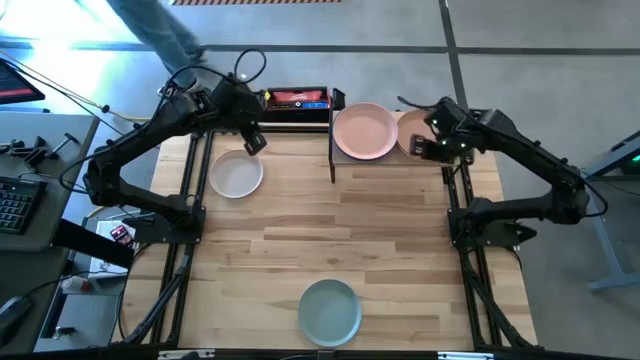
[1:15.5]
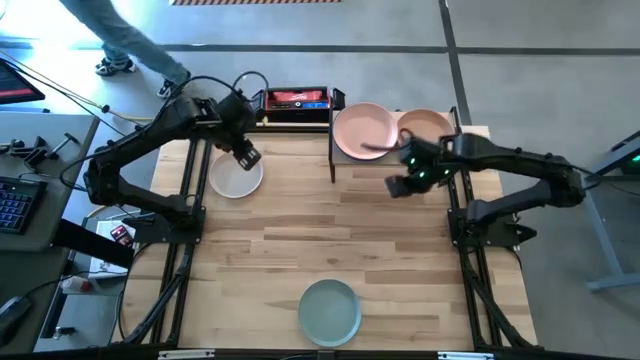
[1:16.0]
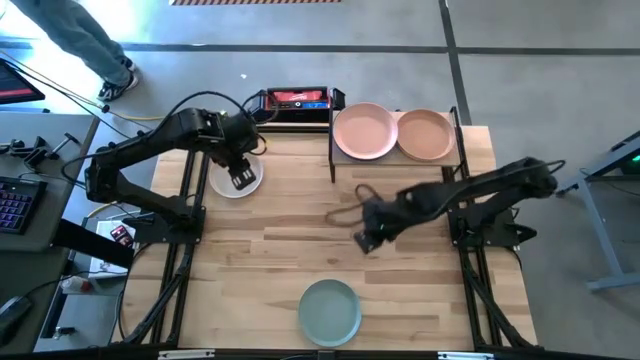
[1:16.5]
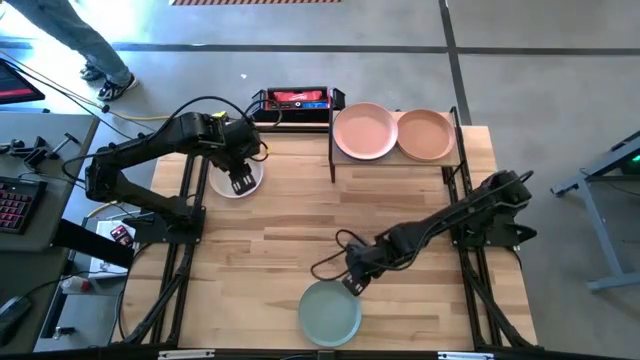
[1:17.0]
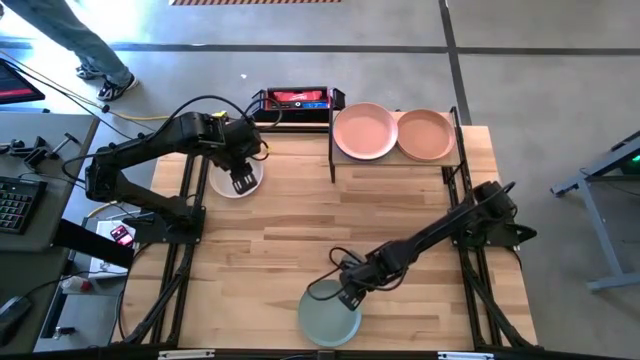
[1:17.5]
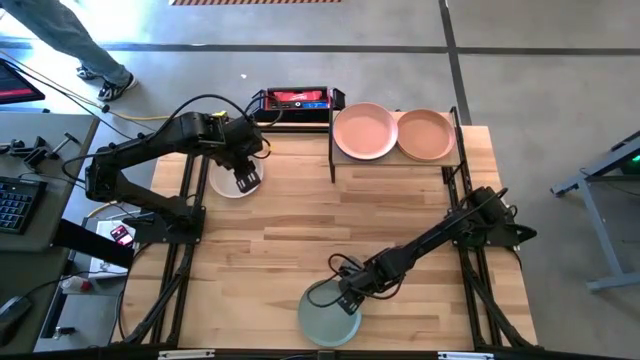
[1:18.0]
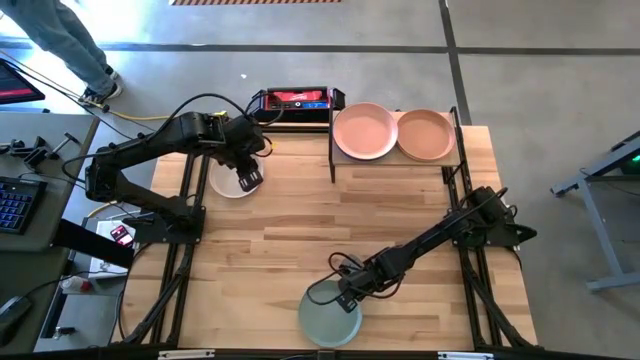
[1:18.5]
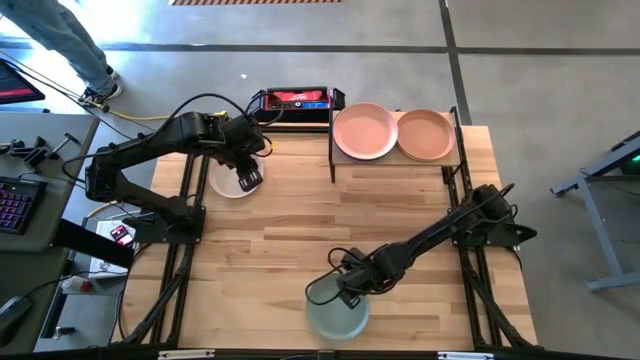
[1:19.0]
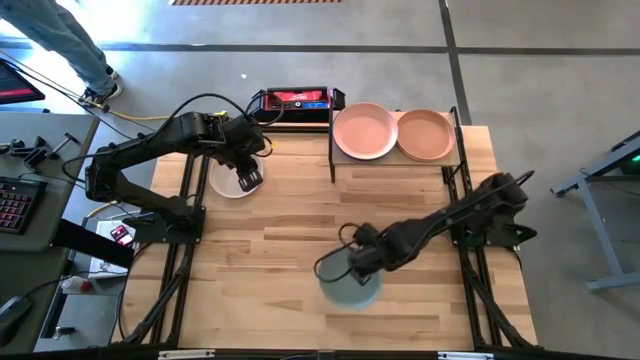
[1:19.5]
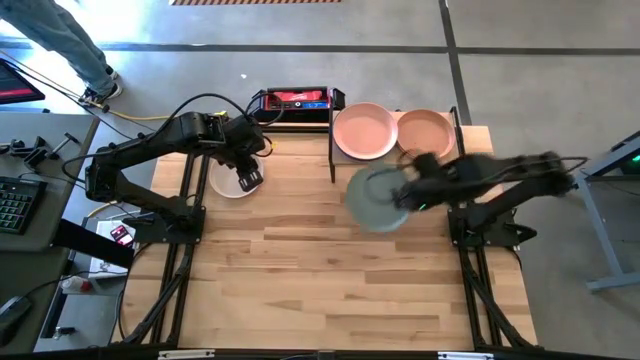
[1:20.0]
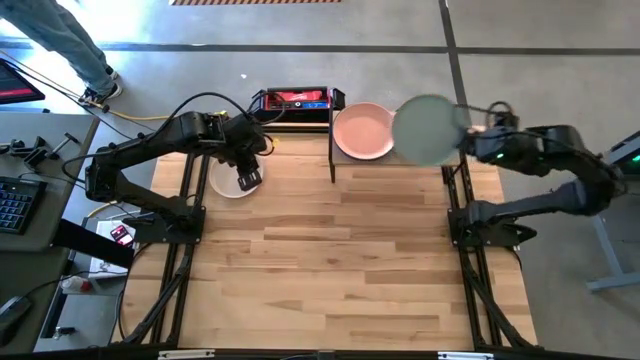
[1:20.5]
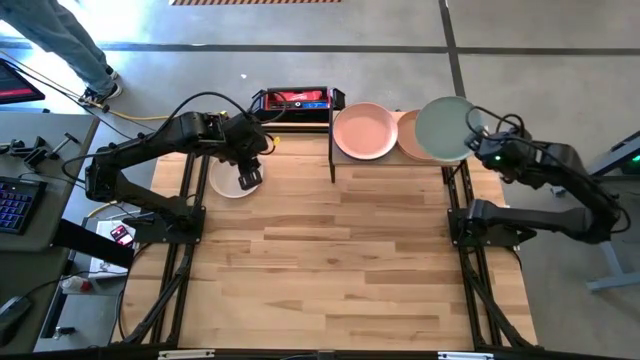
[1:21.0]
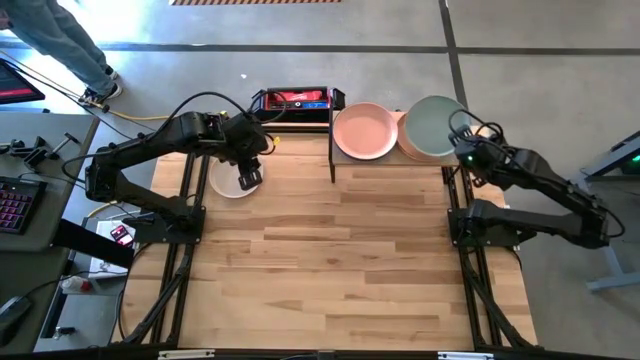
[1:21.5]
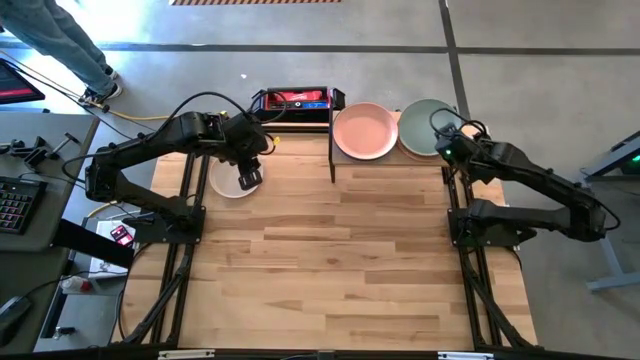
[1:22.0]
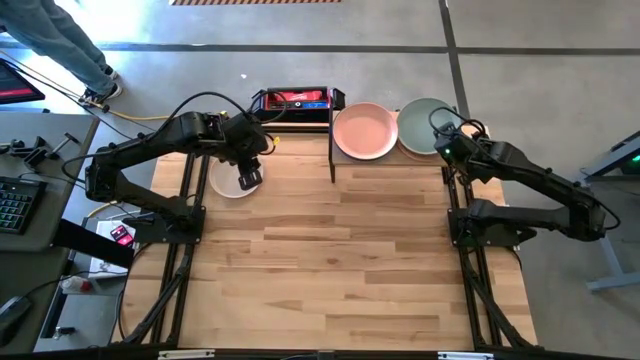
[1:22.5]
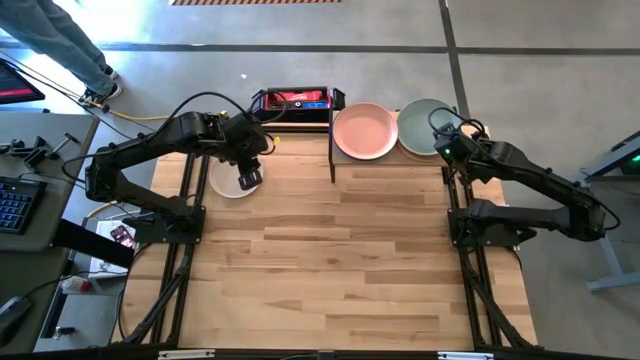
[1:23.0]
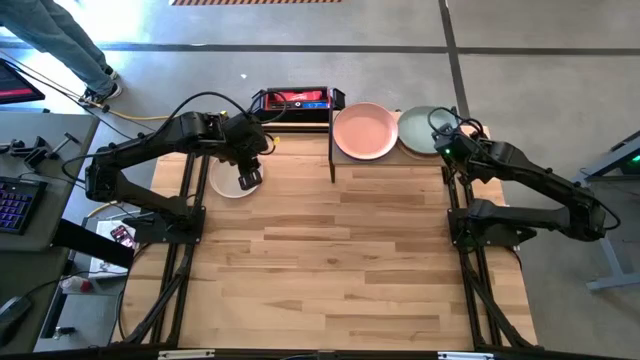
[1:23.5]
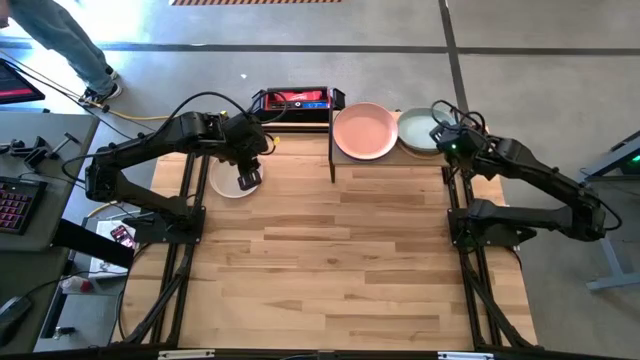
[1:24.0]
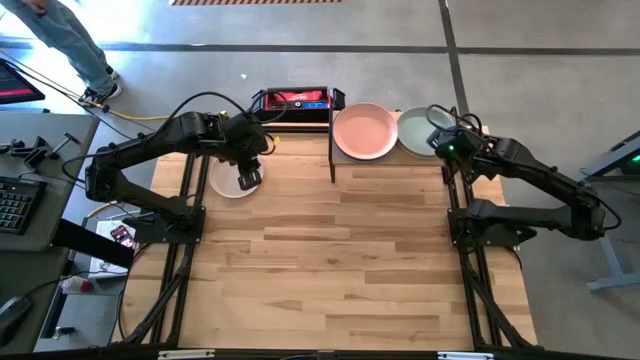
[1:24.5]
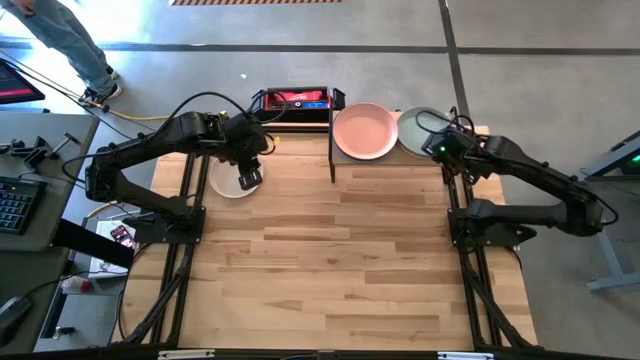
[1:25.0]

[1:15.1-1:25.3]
Task: Place and stack plates onto a shelf
Stack the green plate on top of the orange plate on the shelf

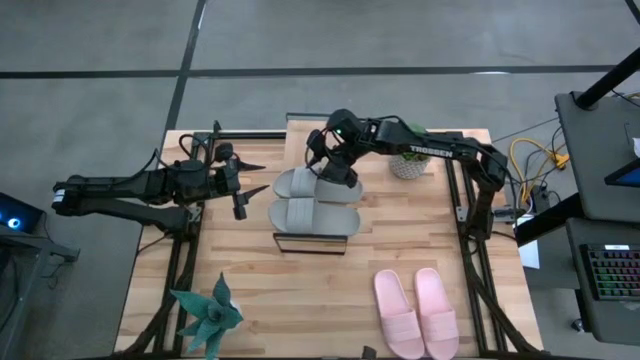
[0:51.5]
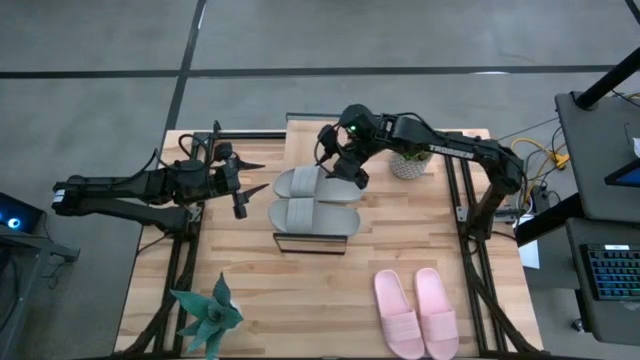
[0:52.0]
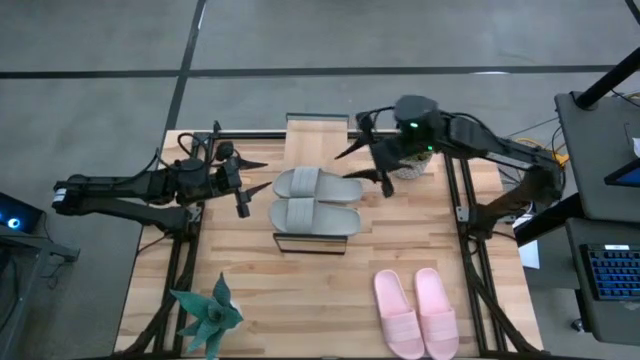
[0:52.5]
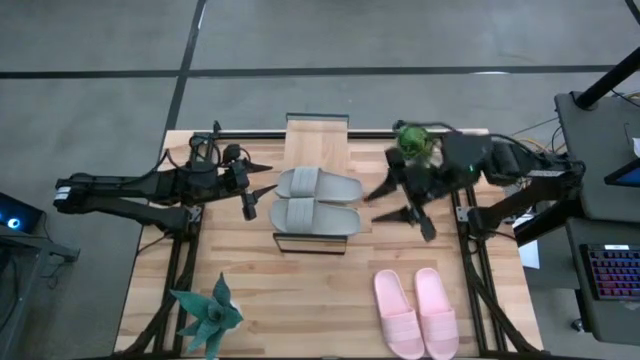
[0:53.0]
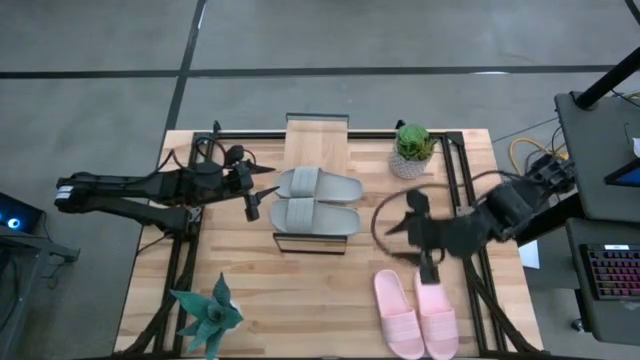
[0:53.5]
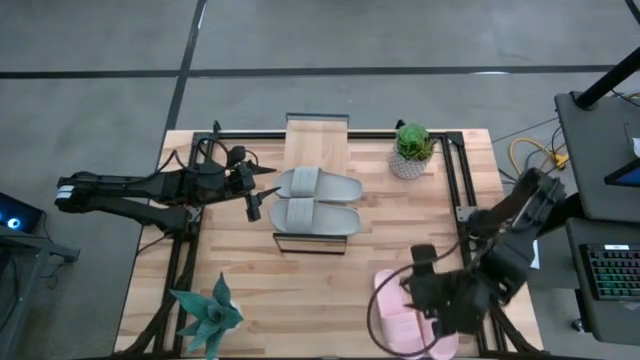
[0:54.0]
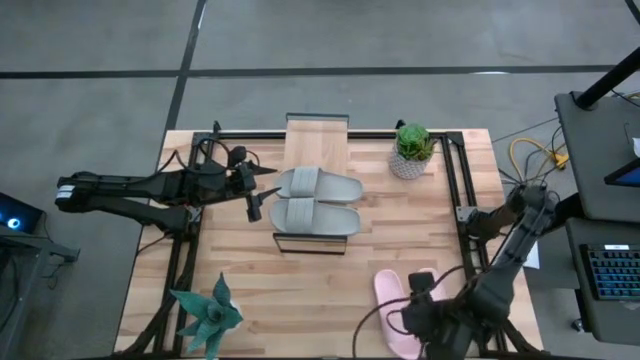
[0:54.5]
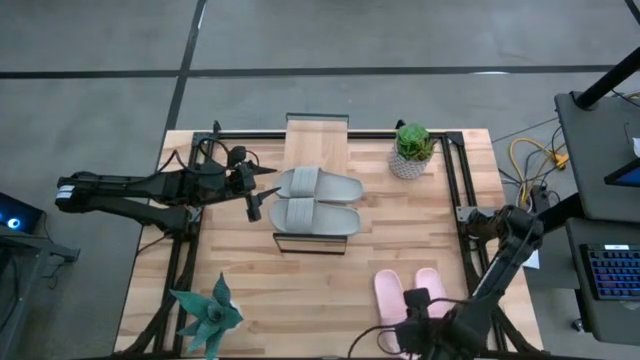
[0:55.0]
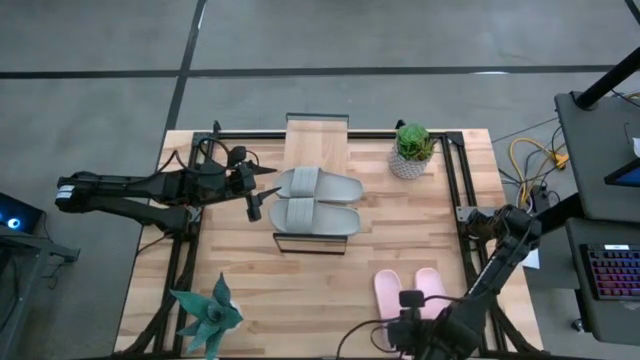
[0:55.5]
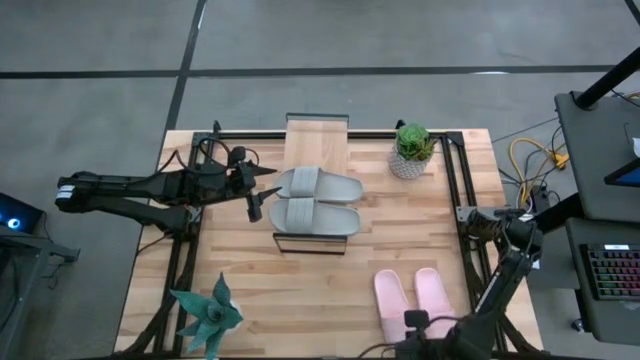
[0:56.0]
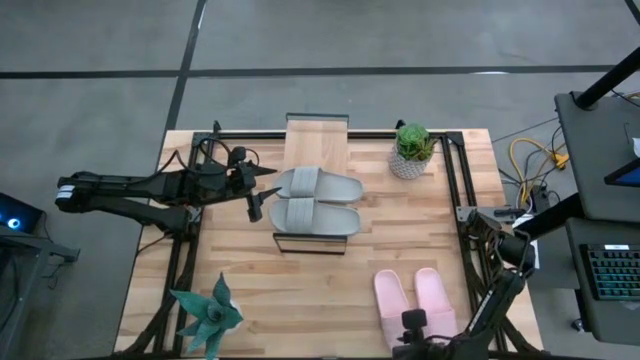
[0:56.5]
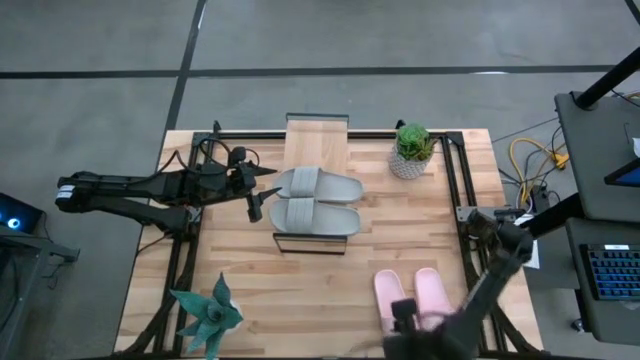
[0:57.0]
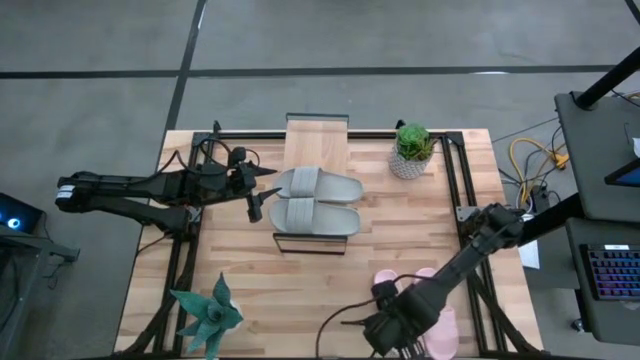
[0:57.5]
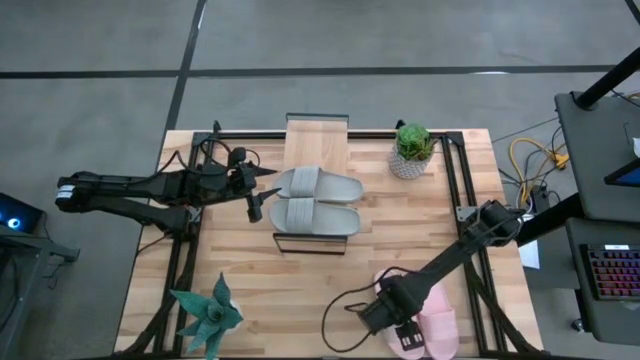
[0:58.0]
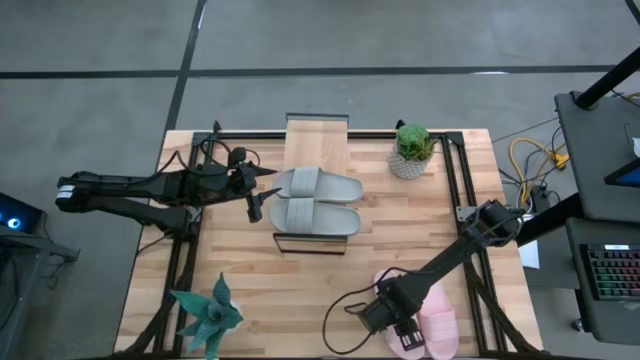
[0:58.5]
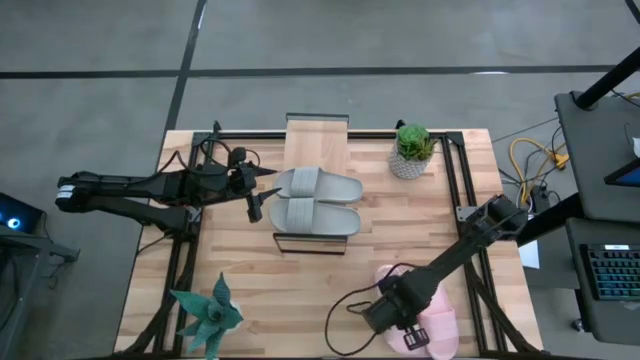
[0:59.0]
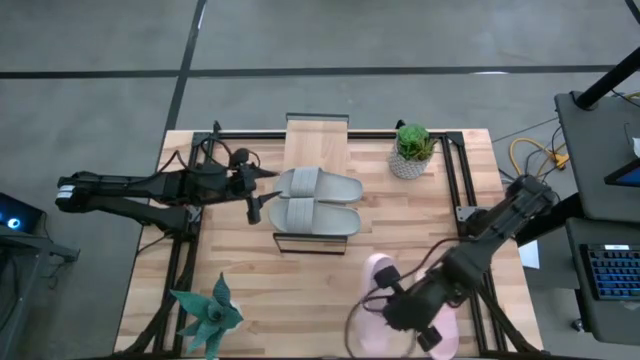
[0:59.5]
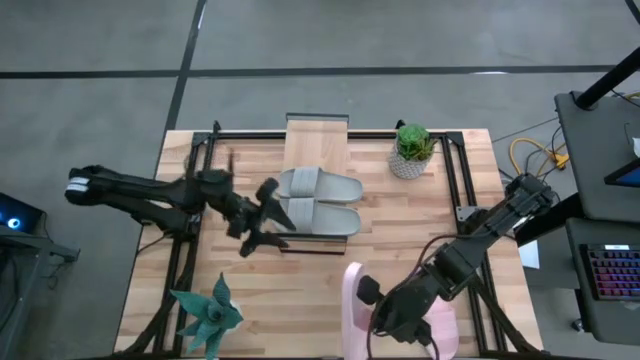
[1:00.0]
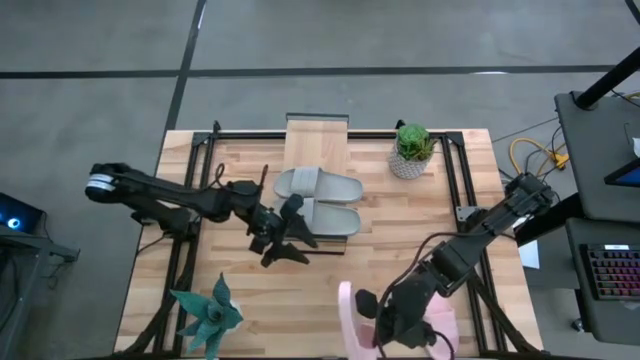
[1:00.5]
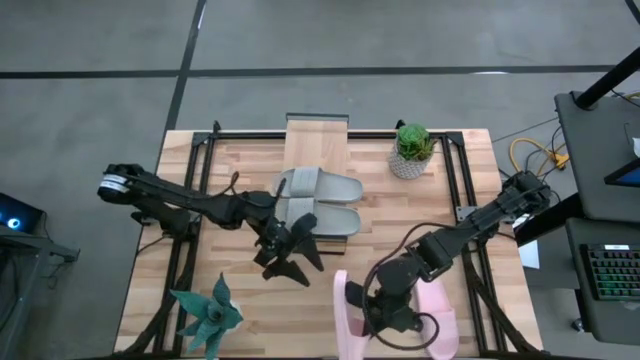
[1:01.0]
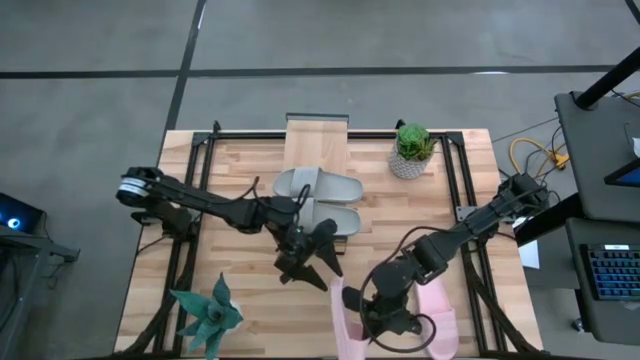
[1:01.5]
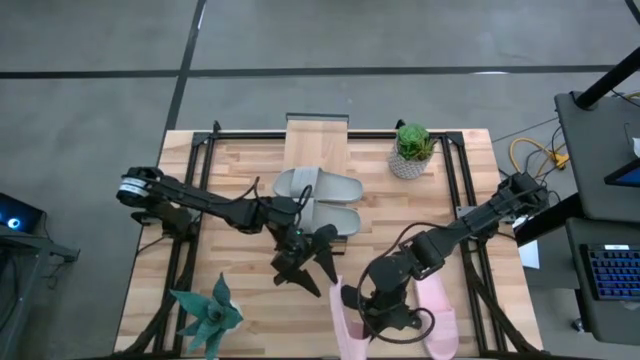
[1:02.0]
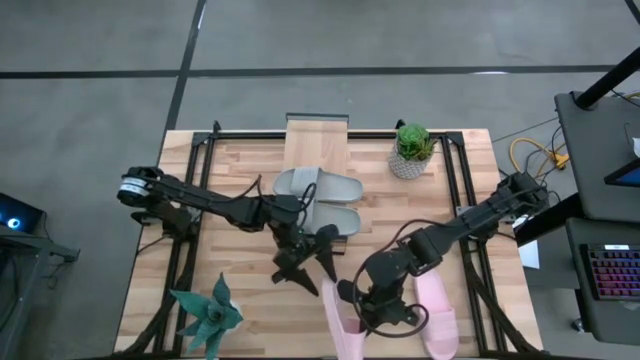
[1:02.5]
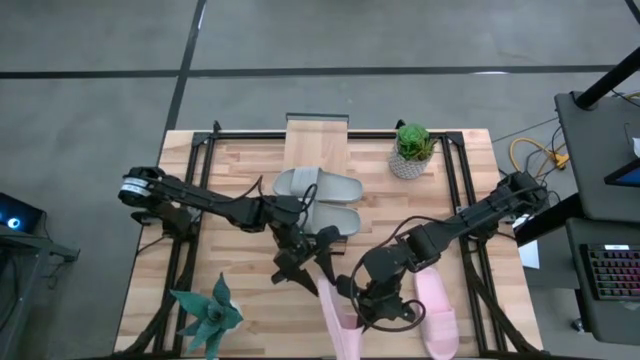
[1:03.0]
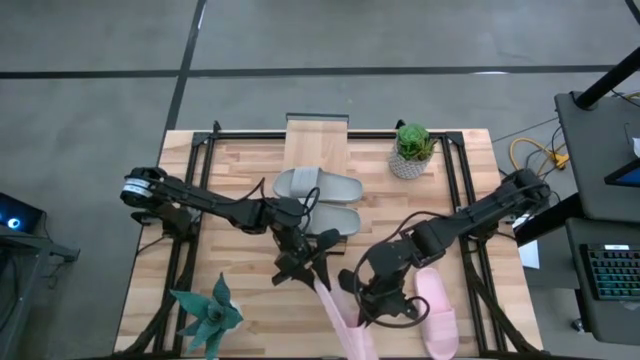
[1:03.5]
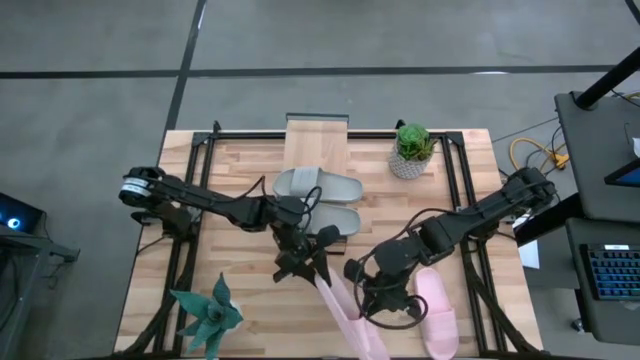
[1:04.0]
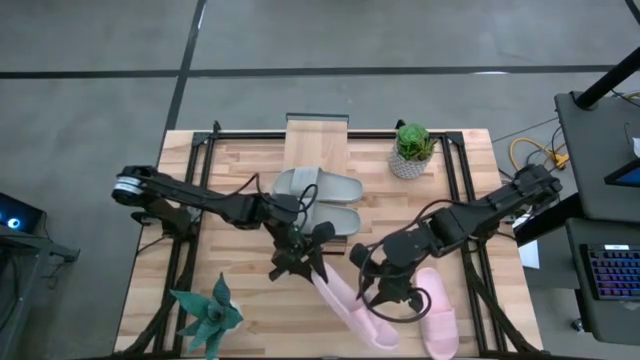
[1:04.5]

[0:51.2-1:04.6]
Task: Pick and place slides into the shelf
Put the left pink slide on the shelf
